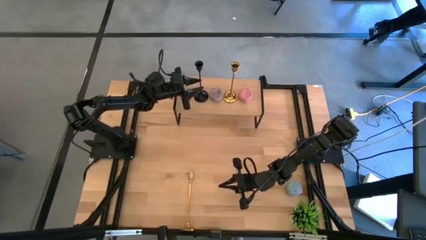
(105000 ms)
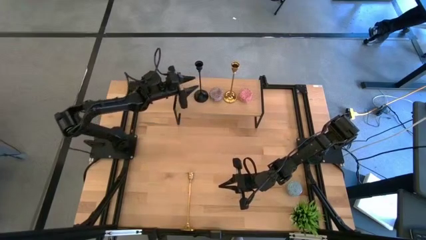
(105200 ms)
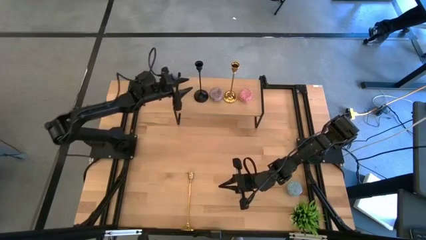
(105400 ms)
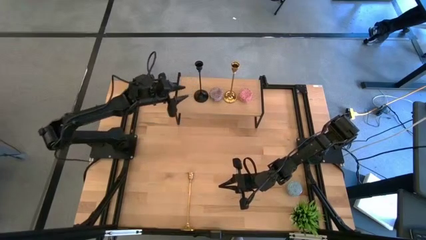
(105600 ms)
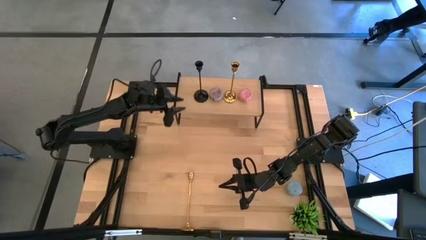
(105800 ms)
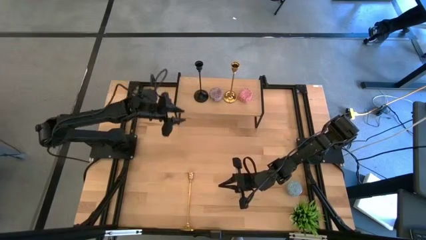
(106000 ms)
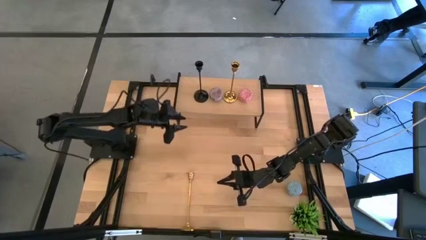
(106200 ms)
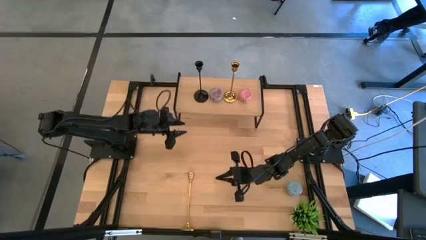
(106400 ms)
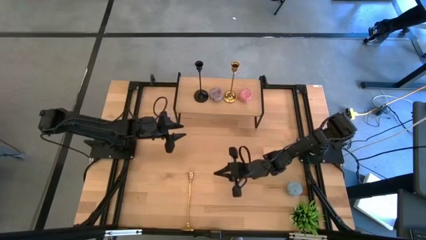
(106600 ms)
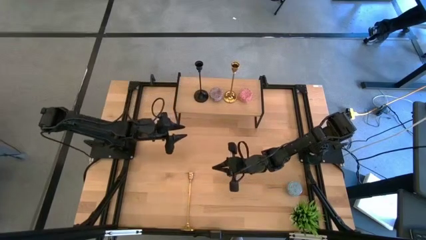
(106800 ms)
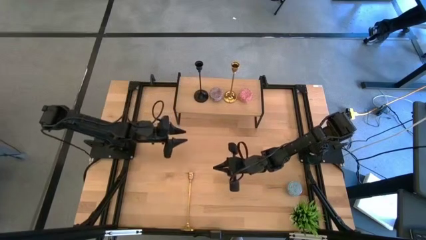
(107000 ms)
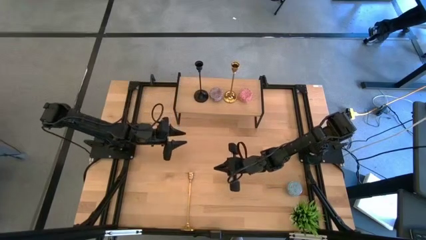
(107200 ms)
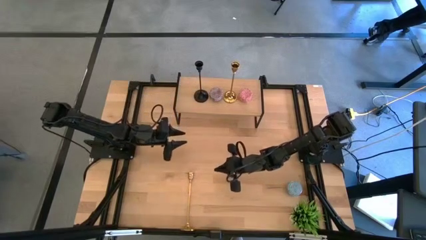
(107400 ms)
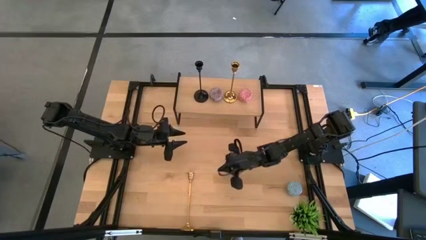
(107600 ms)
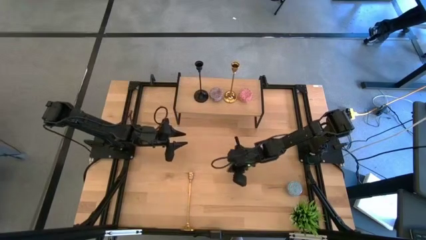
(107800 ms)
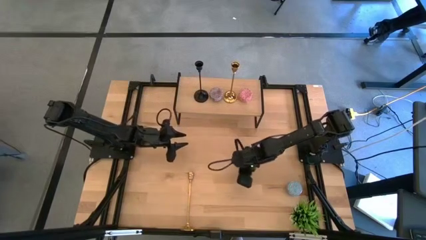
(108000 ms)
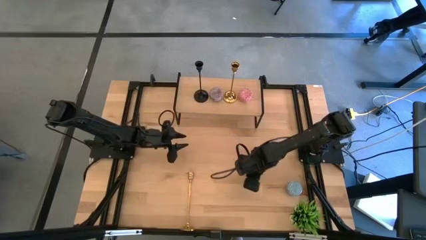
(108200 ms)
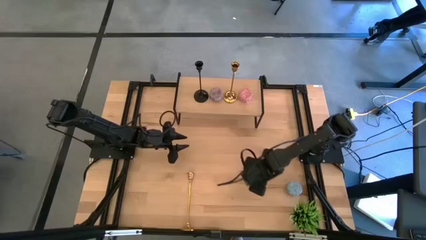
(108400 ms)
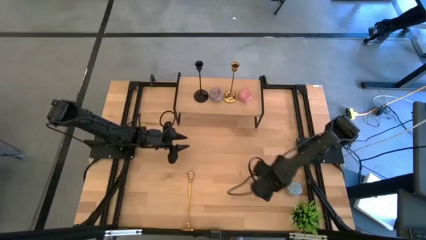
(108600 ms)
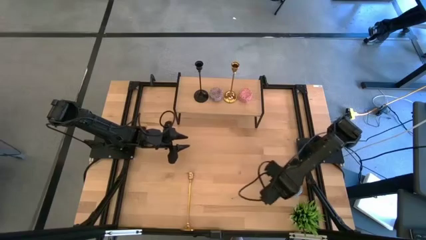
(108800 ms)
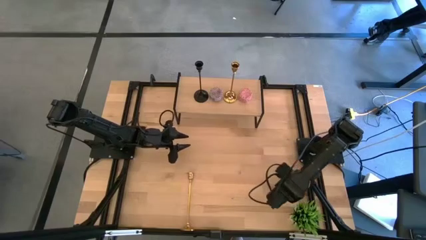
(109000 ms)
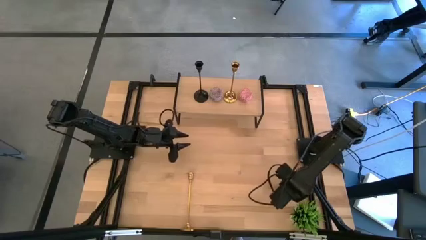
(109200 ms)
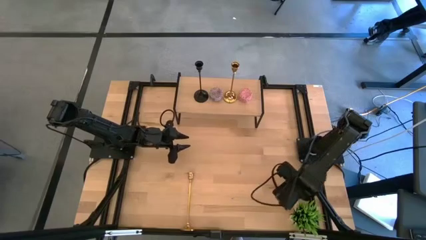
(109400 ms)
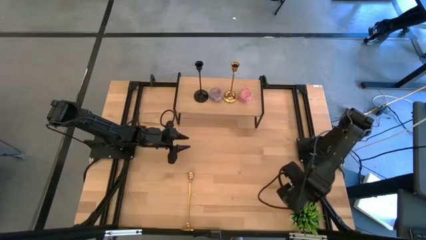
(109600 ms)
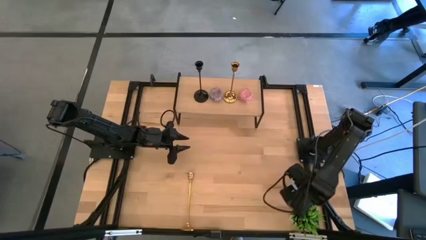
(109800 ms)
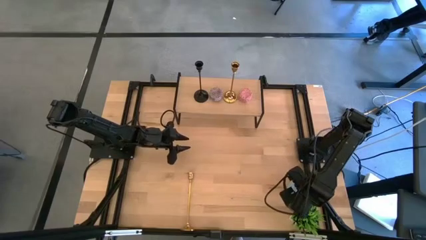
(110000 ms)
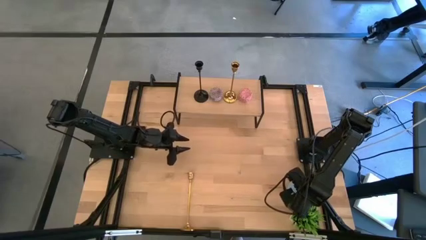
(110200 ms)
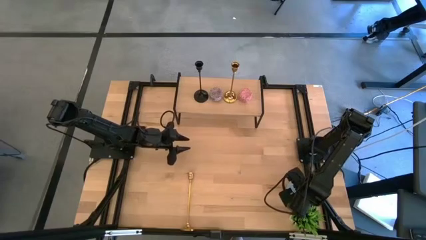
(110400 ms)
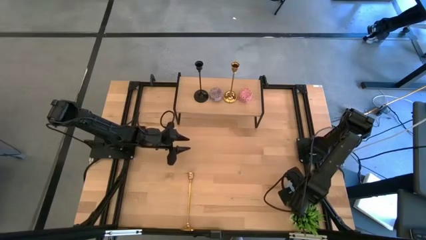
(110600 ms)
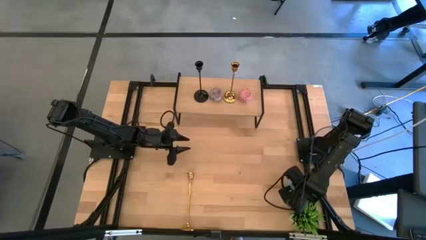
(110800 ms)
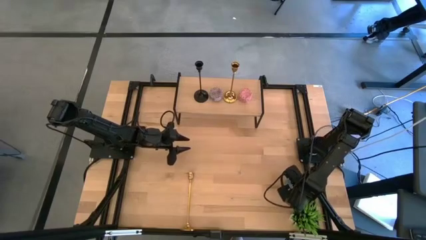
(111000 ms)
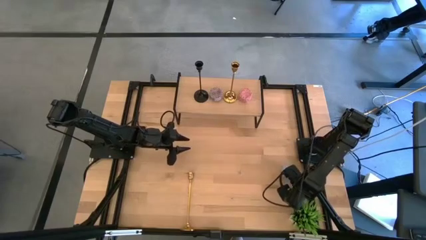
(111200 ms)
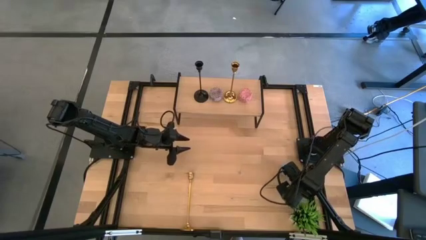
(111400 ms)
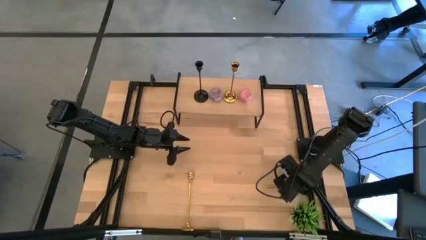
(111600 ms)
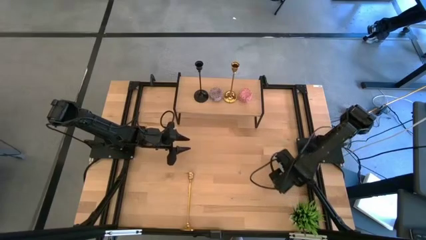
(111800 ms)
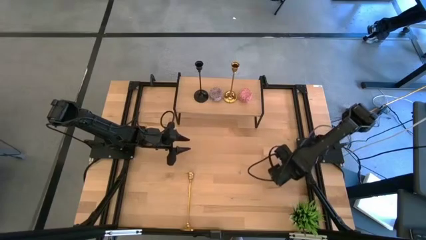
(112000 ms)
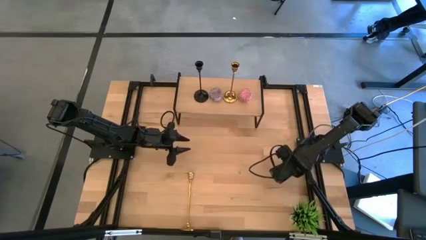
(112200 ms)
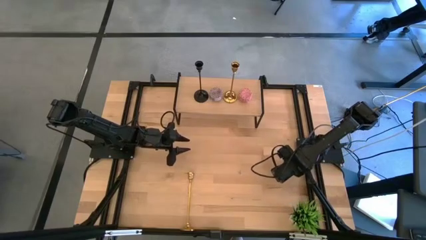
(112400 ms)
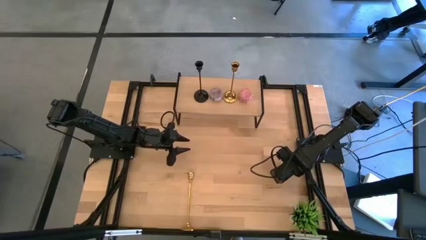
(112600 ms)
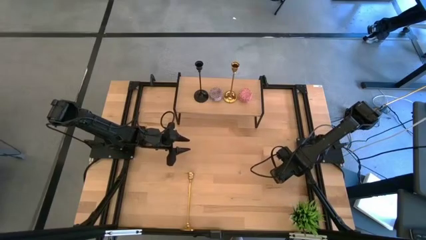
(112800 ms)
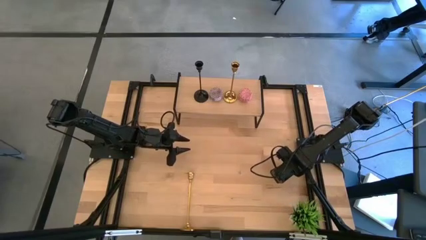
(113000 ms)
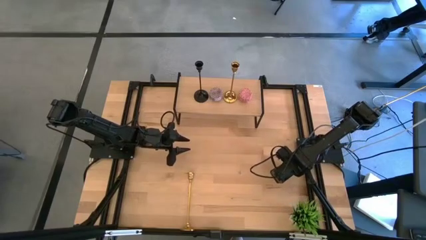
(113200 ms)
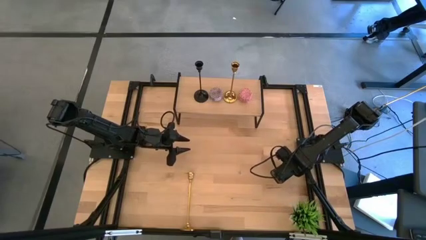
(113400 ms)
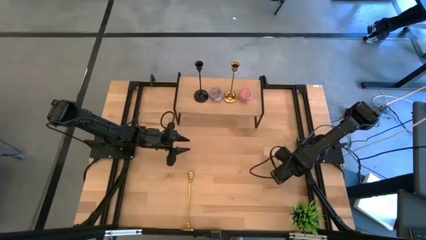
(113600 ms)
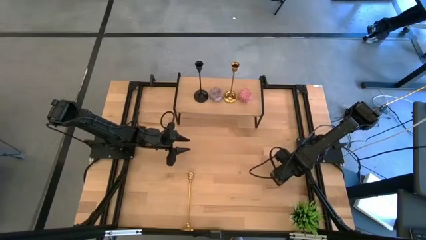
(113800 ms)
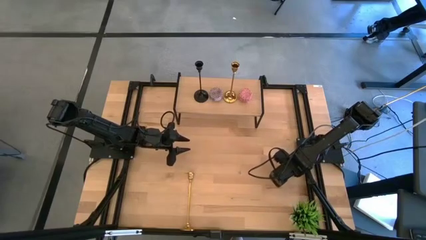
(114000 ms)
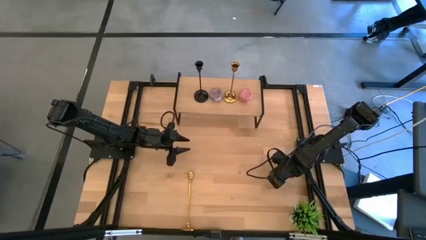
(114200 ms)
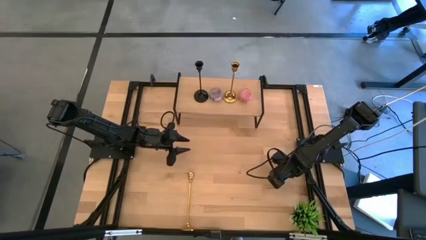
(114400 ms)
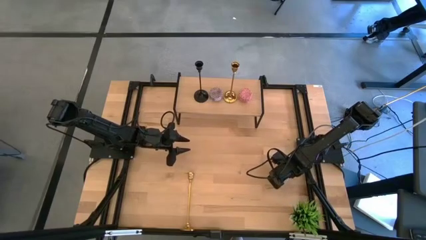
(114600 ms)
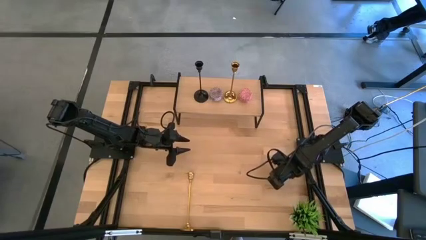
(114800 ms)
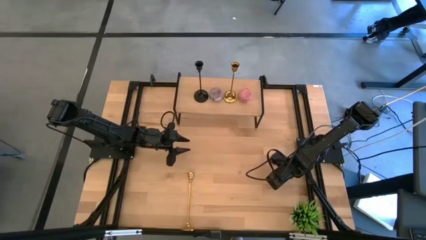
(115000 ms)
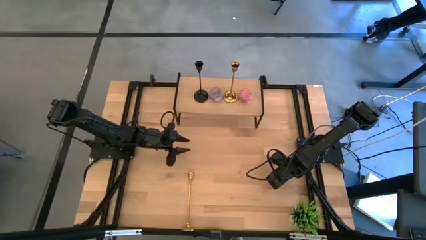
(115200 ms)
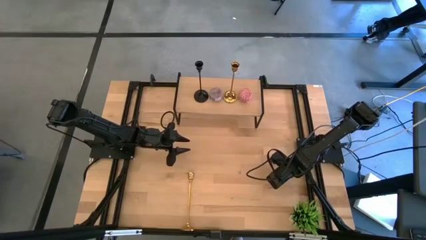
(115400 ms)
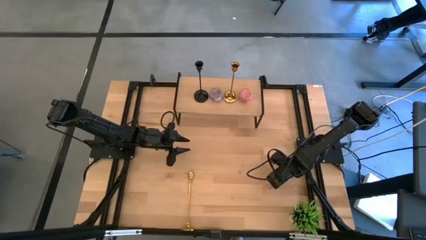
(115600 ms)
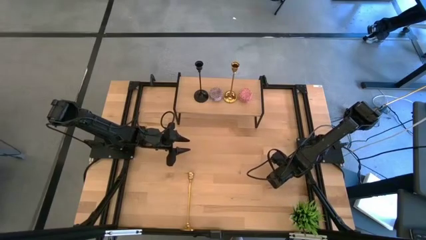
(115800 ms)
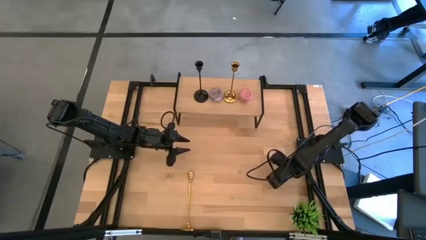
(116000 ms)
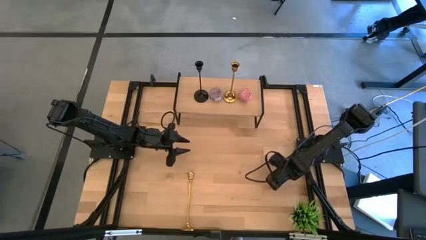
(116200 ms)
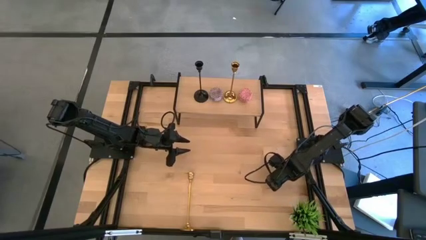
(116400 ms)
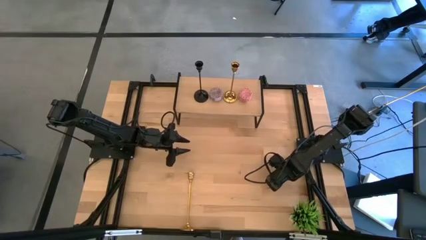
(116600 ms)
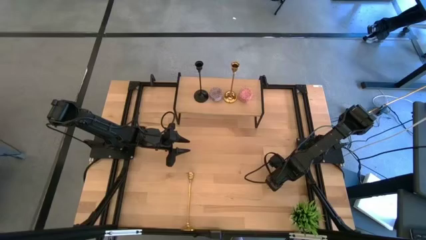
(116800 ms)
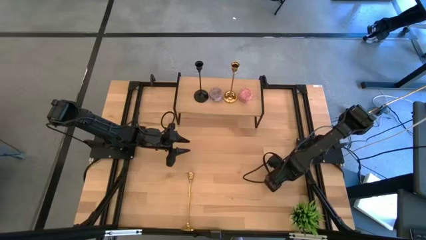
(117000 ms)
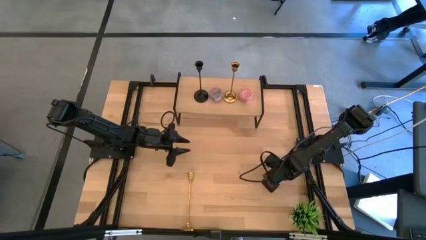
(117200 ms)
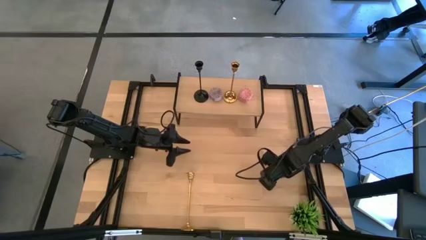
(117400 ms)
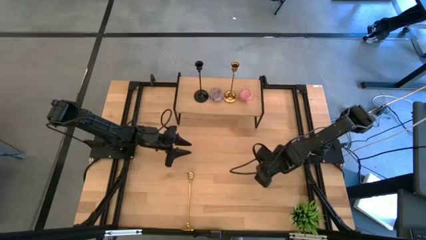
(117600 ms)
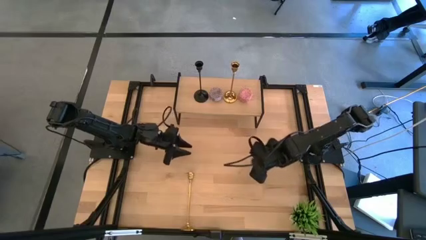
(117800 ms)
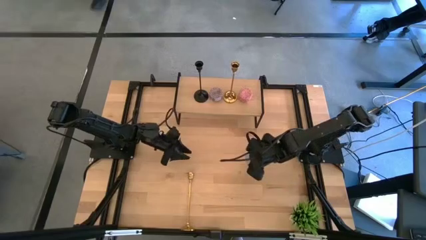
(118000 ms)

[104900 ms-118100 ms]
Task: Pick & Place candle stick holders
Put the blue scented candle on the shelf

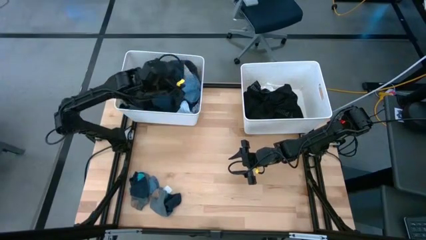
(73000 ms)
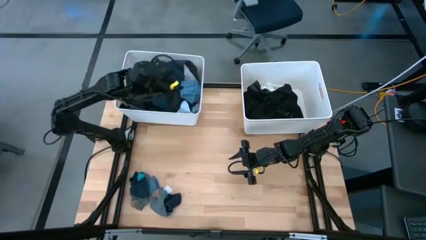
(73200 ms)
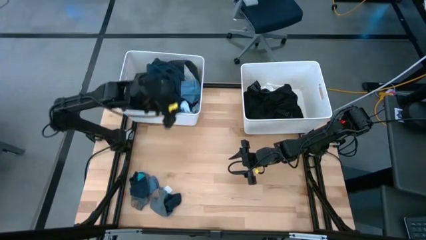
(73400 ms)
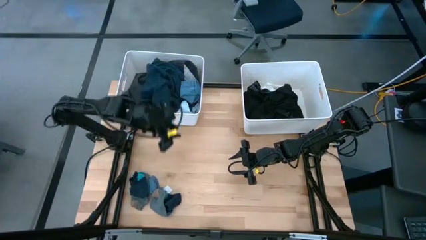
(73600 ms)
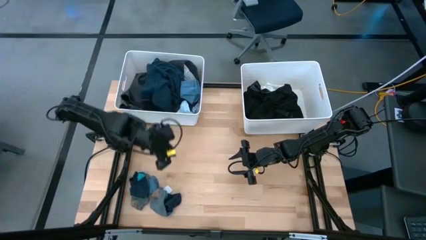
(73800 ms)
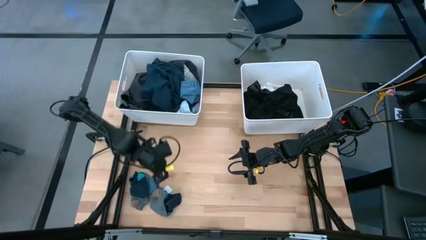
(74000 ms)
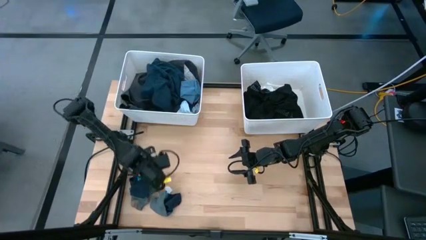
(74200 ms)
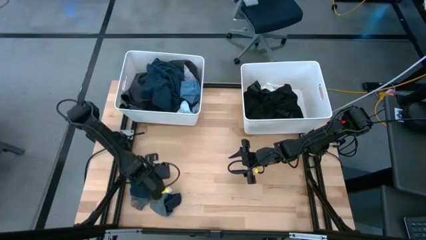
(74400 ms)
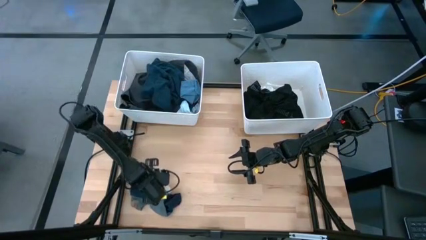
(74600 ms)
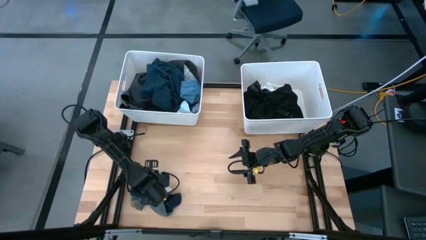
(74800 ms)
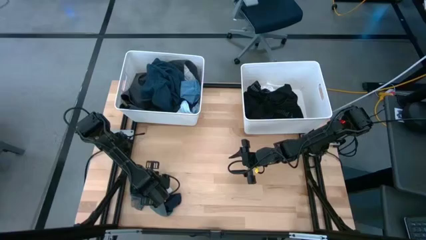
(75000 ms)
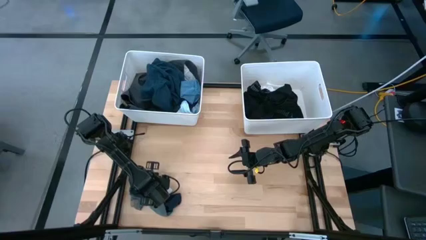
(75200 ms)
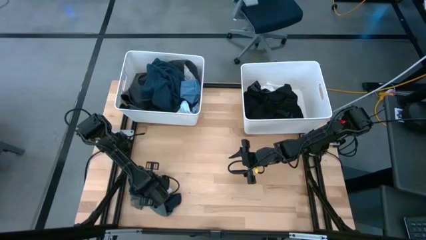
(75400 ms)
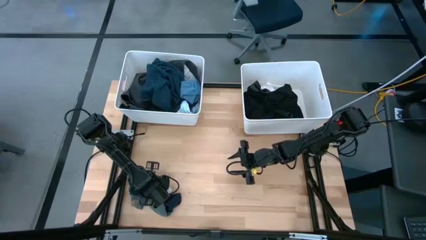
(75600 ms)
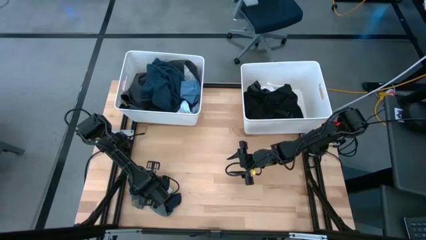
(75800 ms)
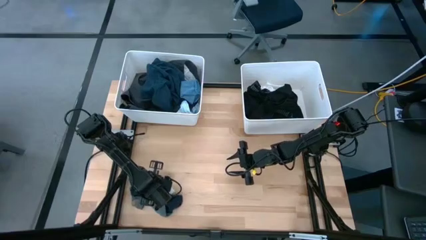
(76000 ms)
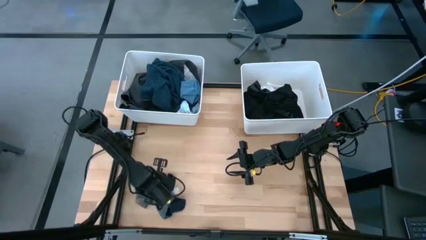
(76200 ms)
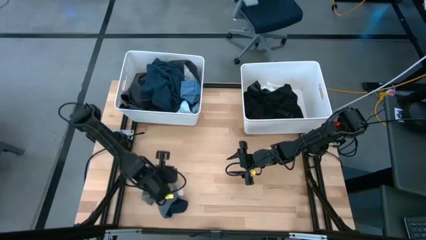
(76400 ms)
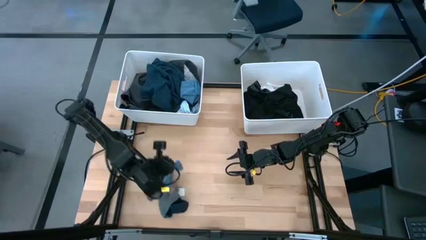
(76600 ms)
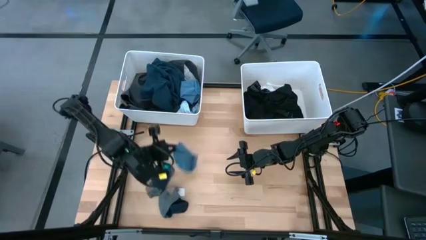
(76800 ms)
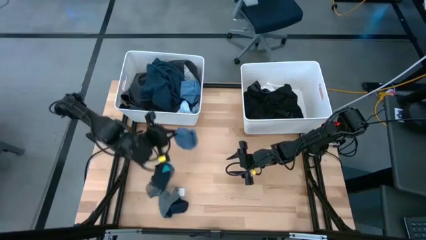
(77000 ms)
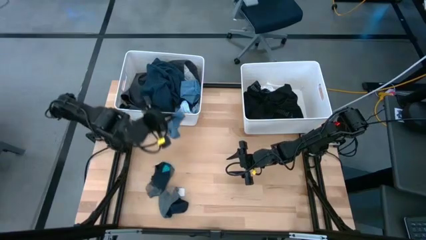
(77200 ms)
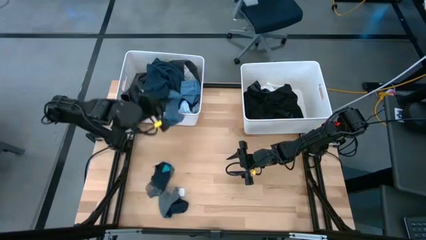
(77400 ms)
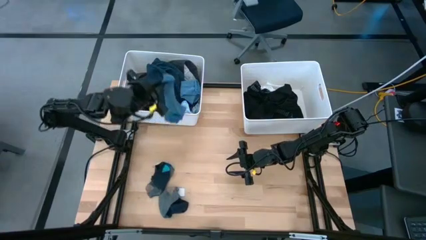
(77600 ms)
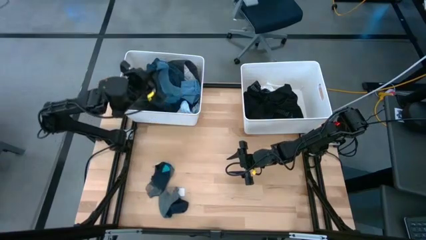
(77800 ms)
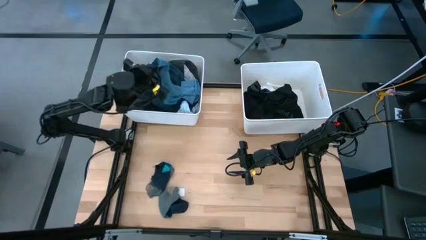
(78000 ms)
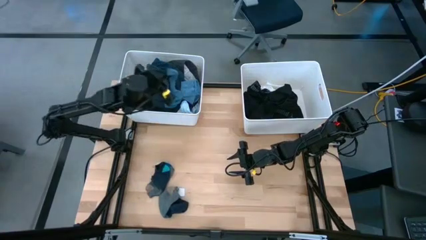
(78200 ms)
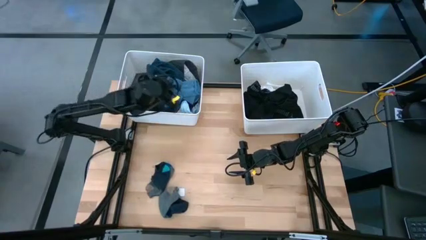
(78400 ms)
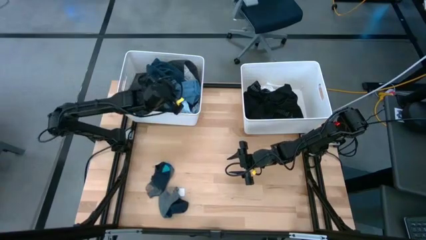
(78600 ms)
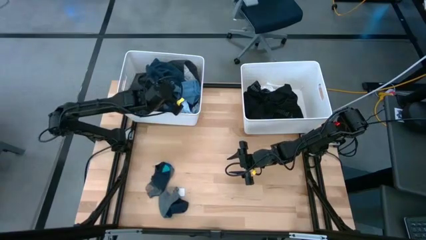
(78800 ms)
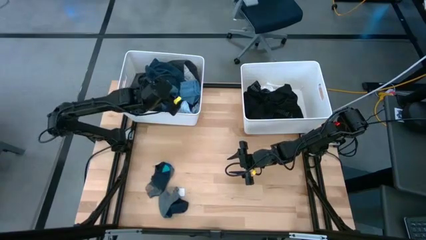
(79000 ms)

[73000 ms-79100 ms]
Task: Sort clothes
Put the blue sock into the left white laundry bin
